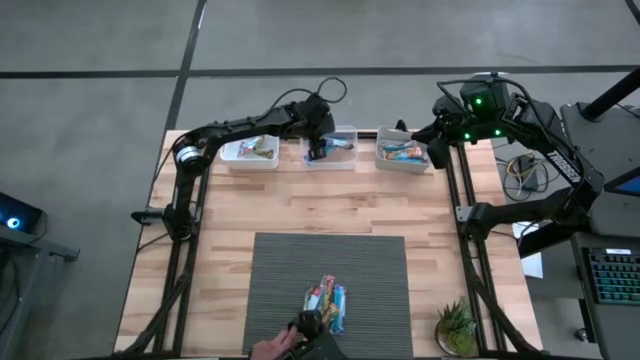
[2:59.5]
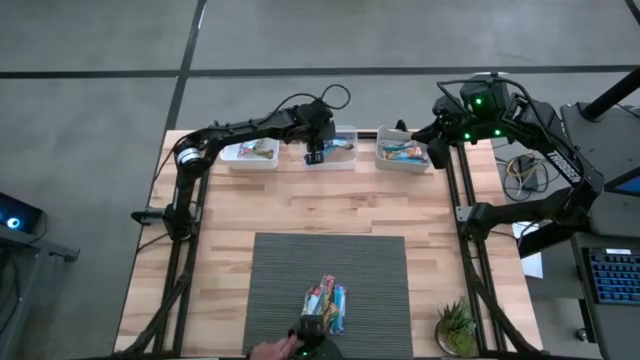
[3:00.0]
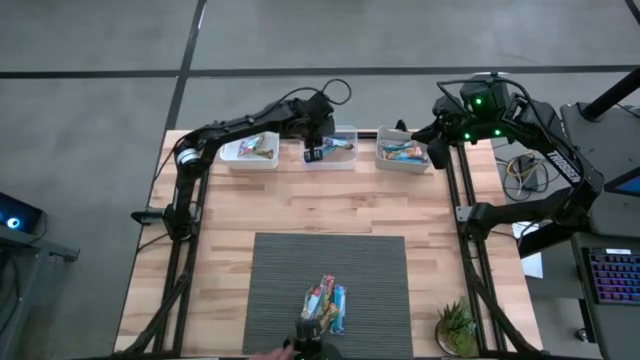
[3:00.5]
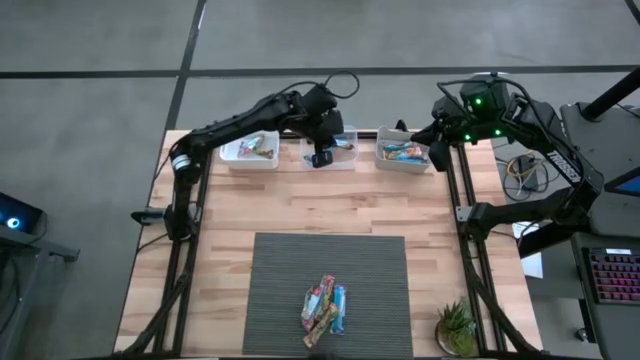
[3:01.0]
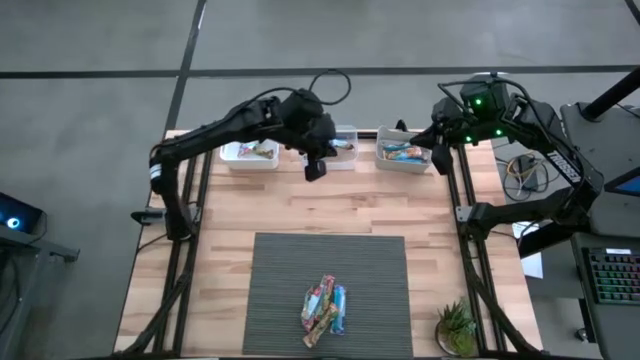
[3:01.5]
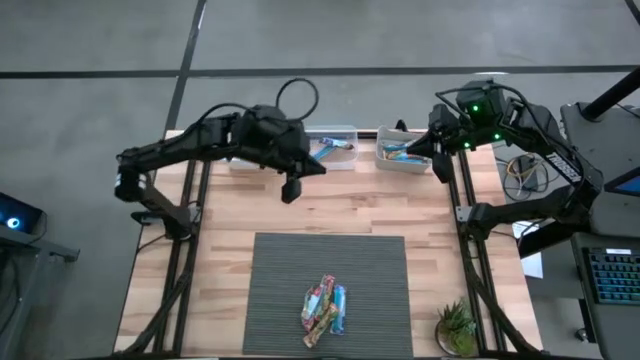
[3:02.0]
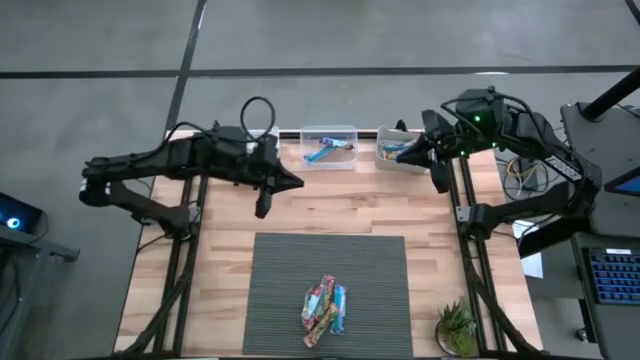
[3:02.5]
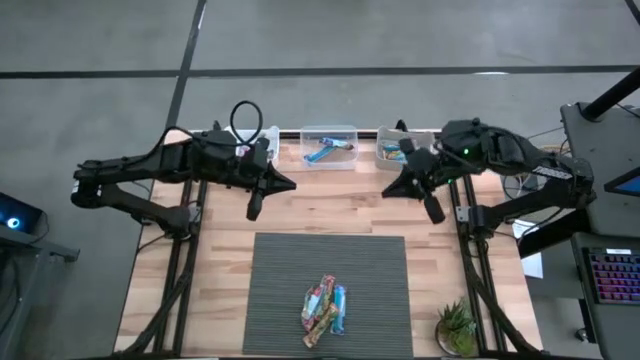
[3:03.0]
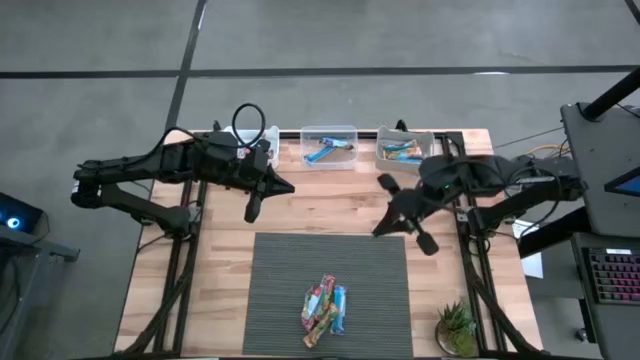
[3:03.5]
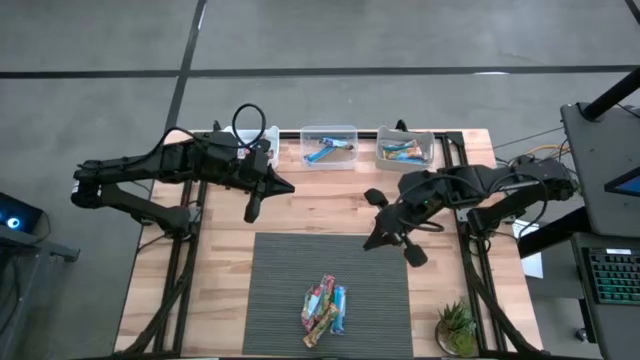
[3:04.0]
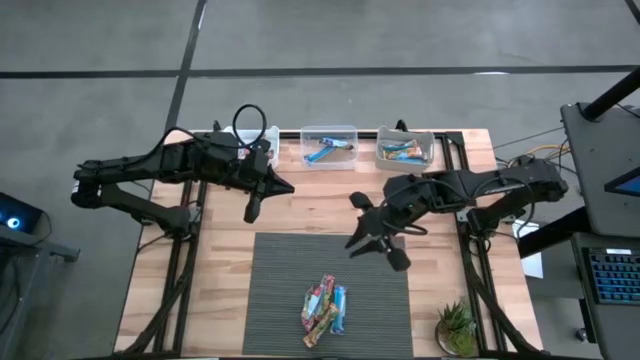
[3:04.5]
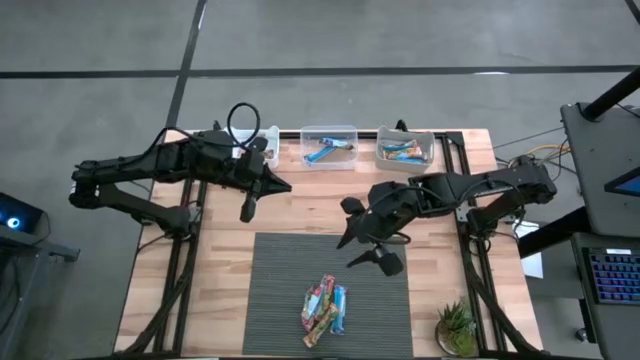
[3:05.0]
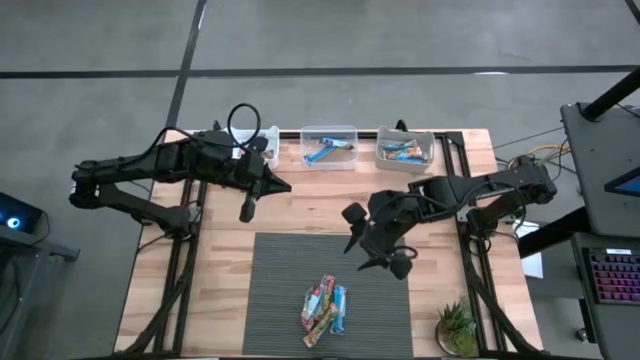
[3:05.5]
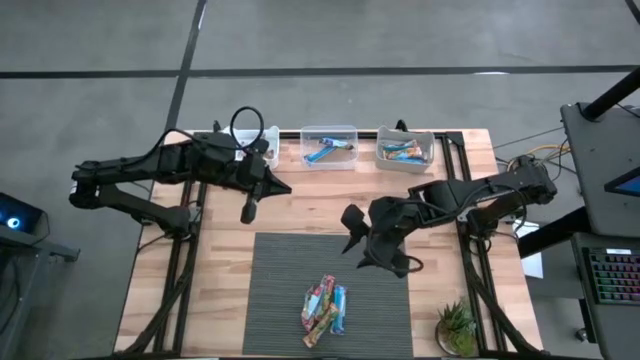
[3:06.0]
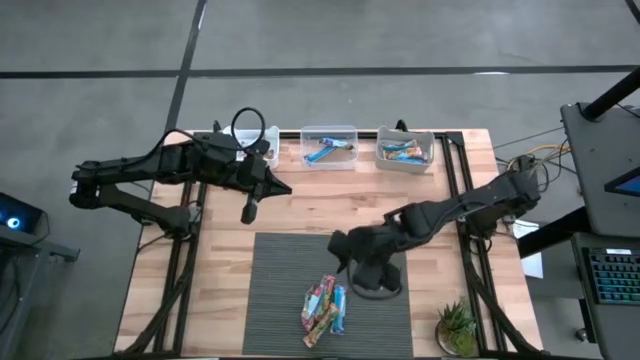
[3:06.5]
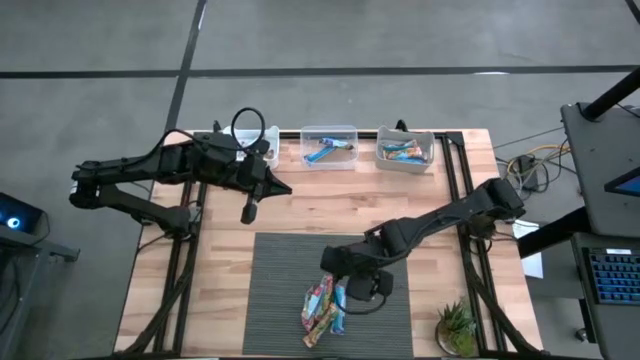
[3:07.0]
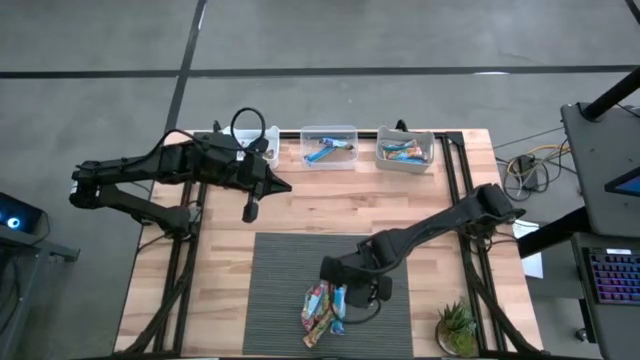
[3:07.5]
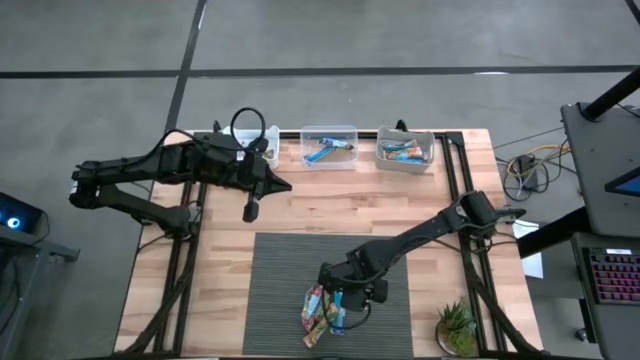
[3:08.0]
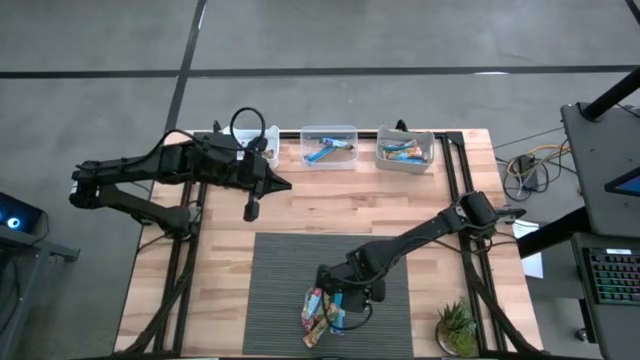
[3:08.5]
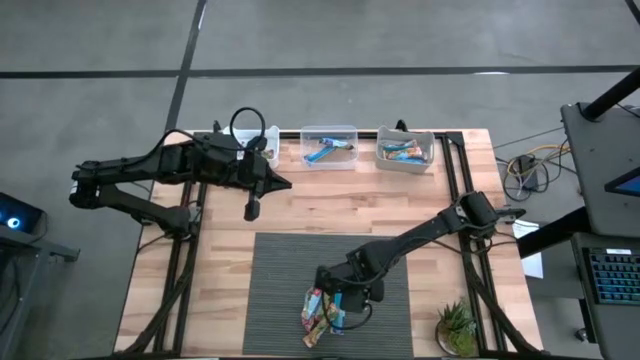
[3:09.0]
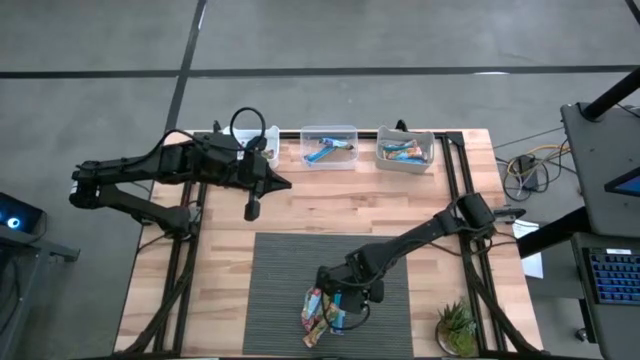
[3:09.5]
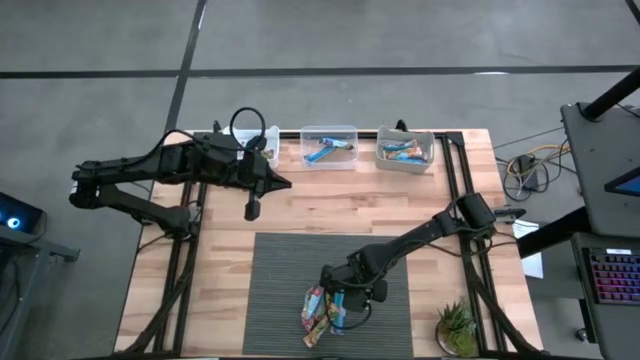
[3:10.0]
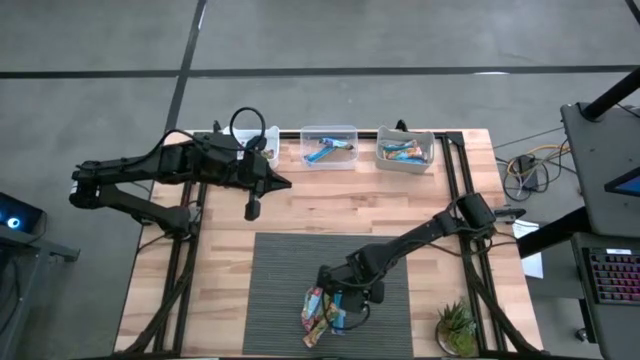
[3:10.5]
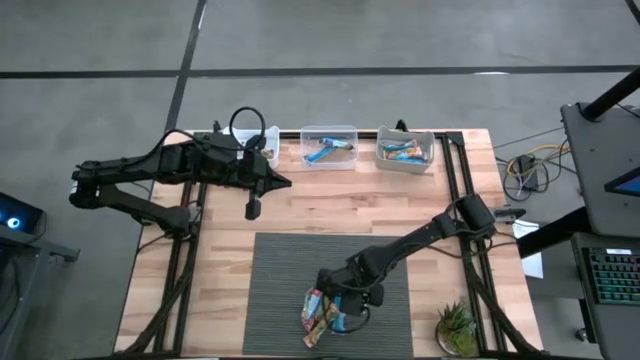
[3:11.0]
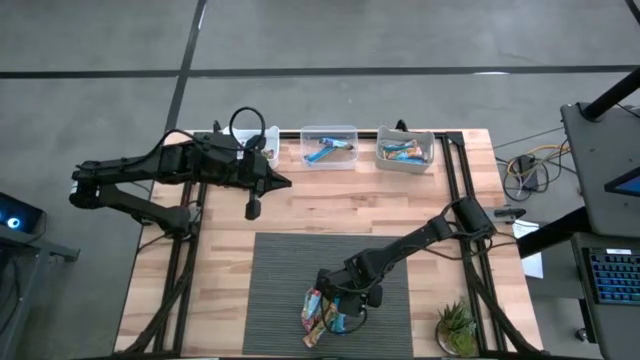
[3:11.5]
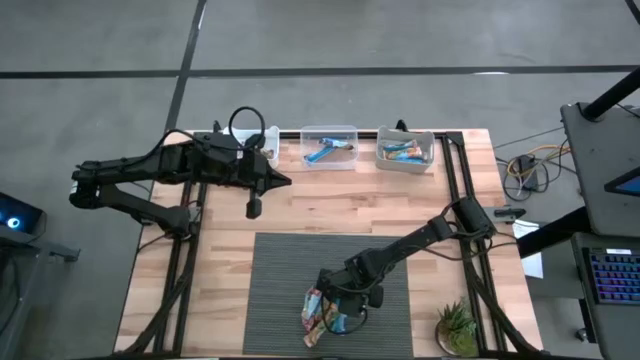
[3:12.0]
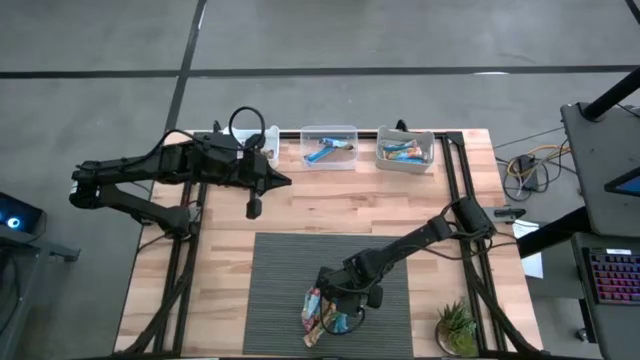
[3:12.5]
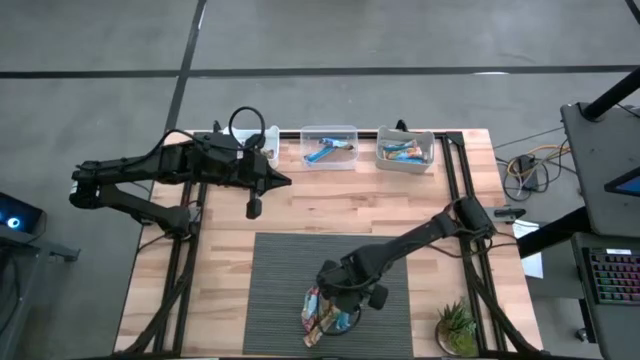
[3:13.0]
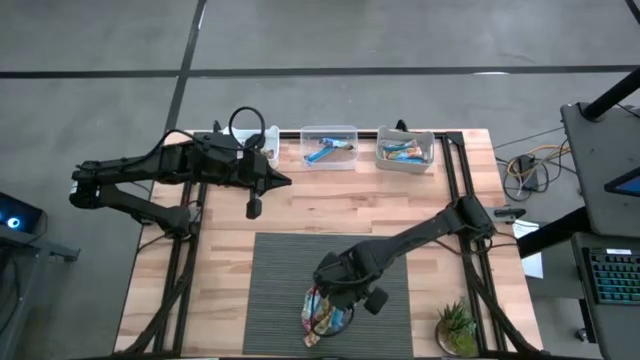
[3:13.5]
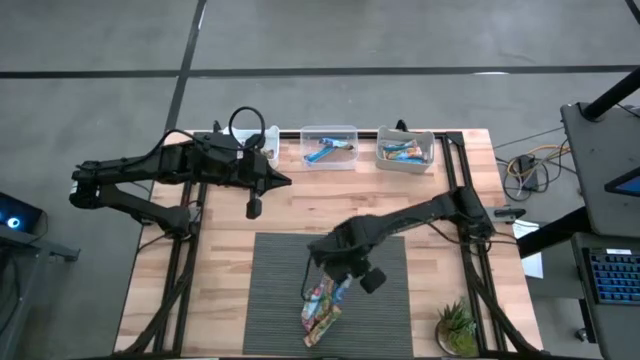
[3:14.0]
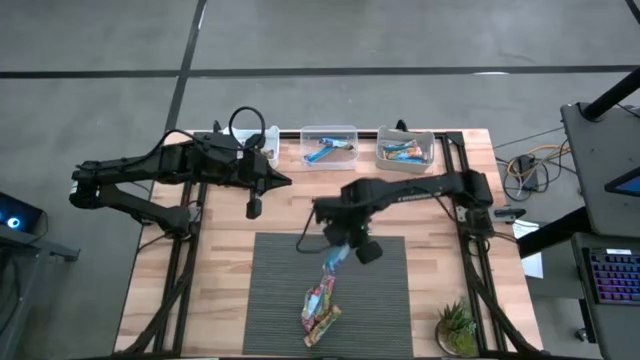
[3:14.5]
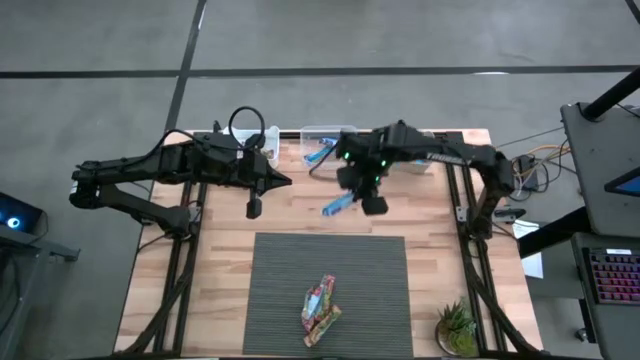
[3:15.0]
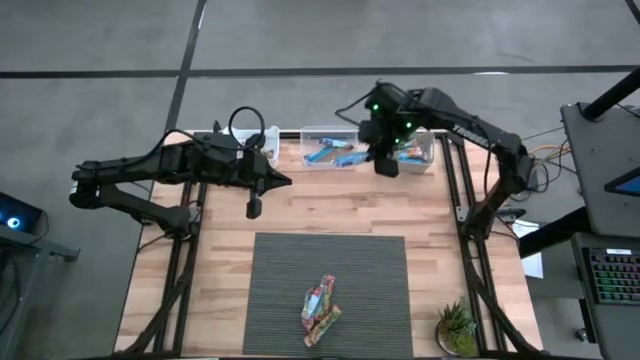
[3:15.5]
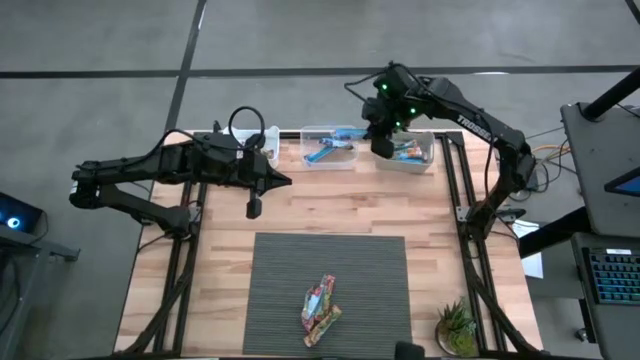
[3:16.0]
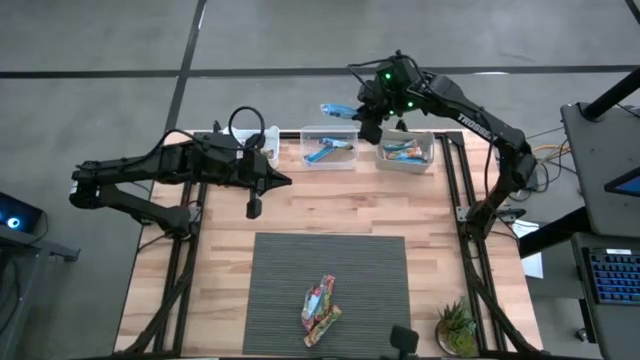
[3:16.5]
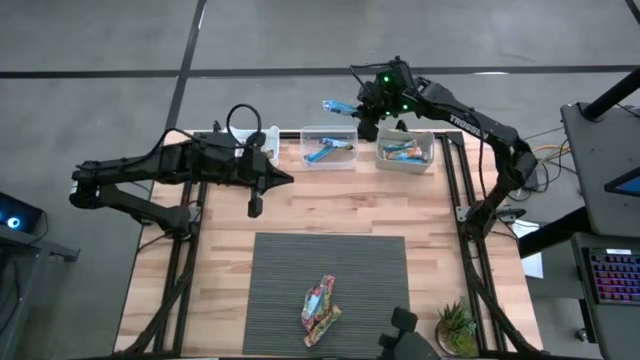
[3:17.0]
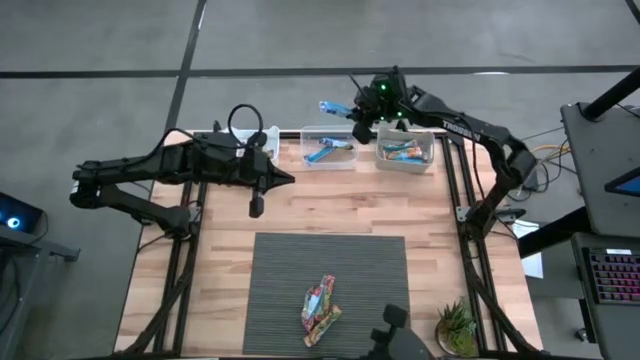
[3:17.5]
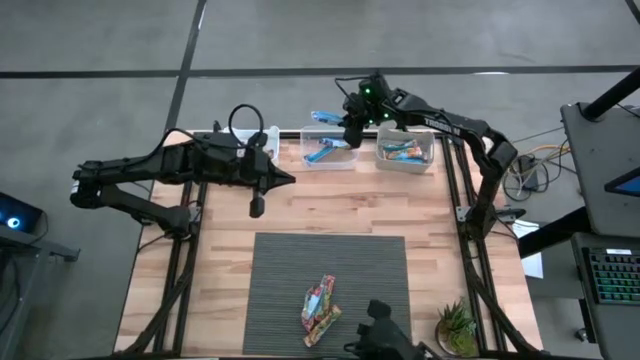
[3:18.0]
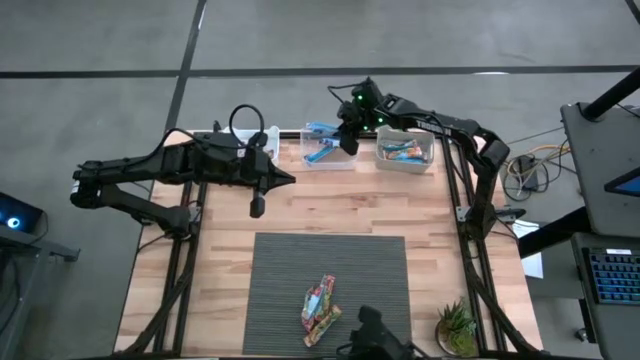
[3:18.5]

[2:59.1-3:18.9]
Task: Pick and place Granola Bars by type
Put the blue granola bar into the transparent bin

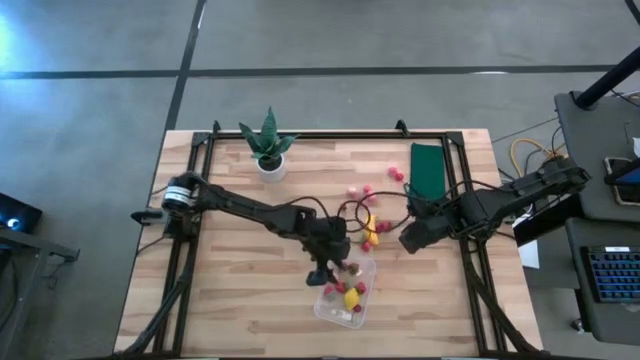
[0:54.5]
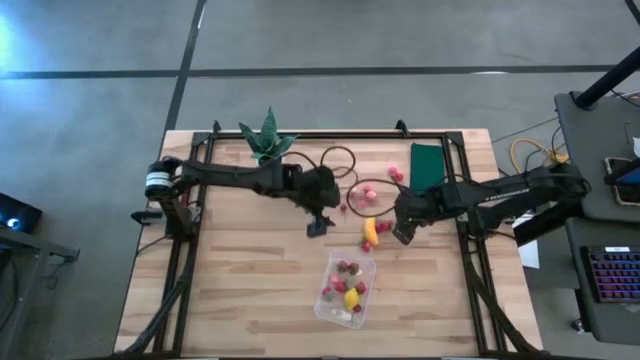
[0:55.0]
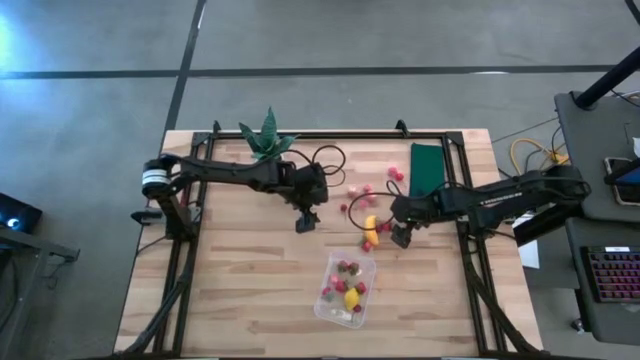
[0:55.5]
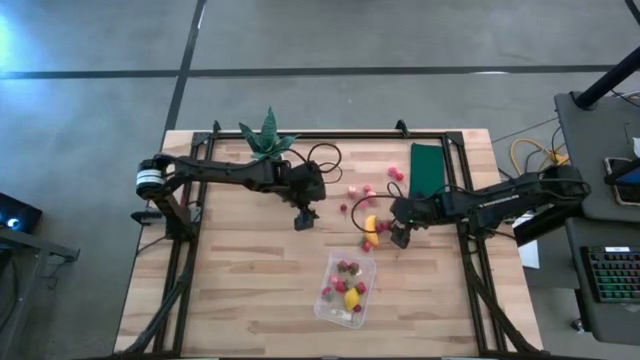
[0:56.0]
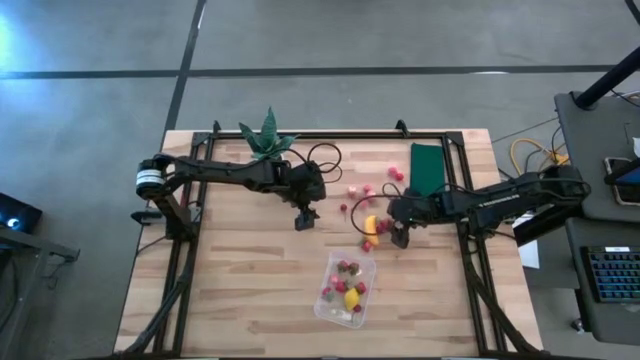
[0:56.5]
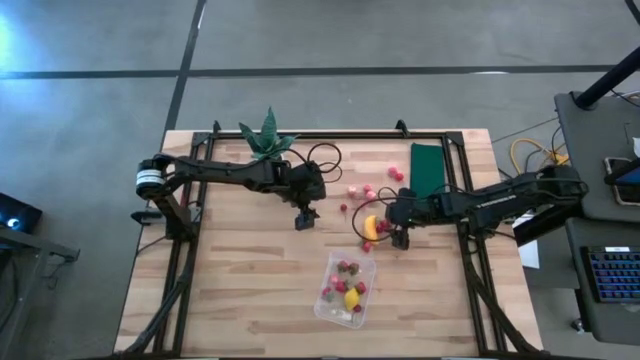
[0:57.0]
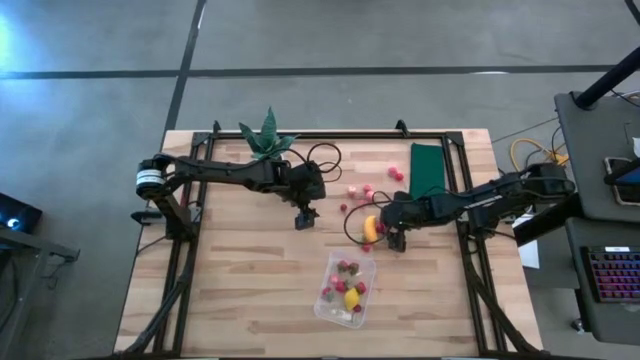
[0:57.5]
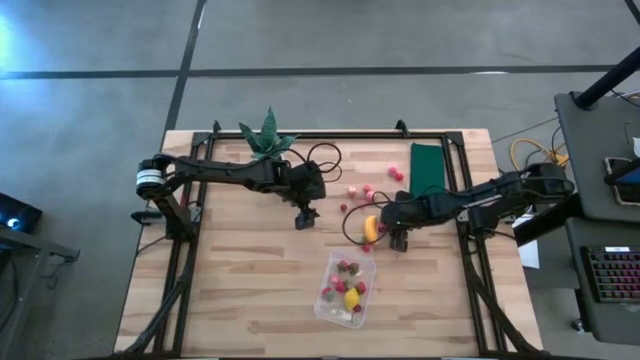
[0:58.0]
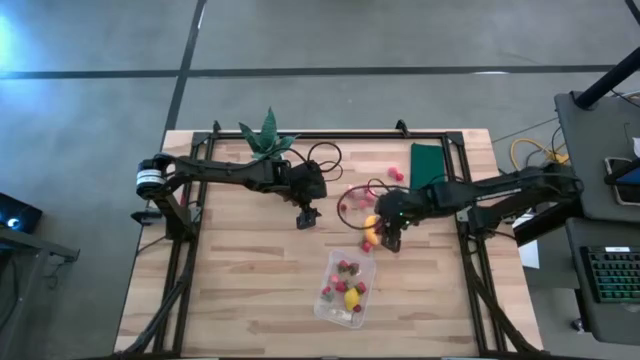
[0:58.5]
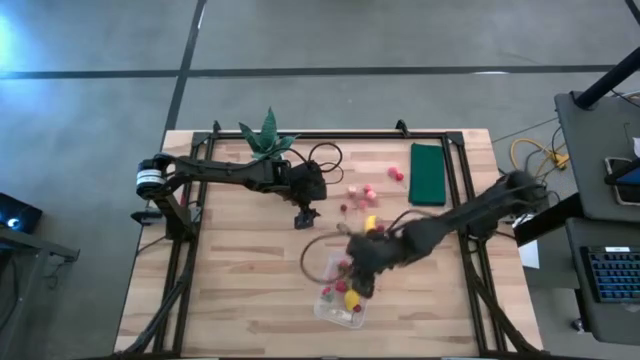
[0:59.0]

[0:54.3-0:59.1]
Task: Pick and placing Produce into tupperware
Put the strawberry into the transparent bin
